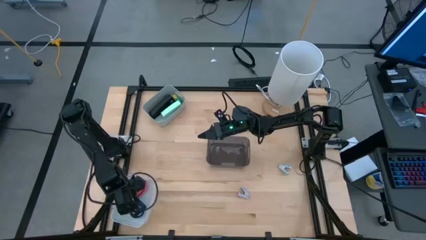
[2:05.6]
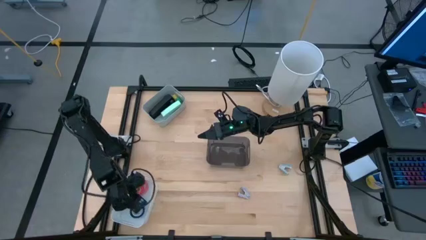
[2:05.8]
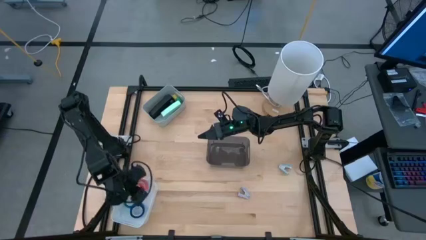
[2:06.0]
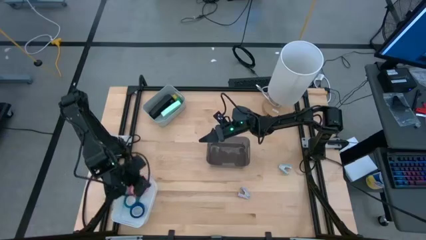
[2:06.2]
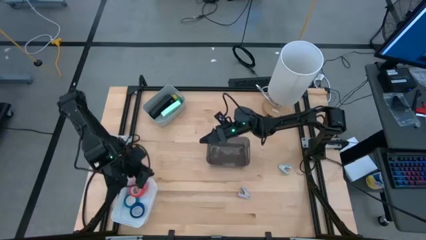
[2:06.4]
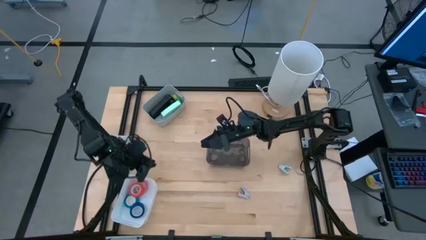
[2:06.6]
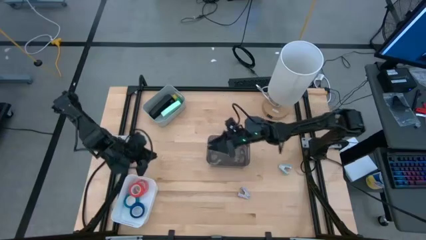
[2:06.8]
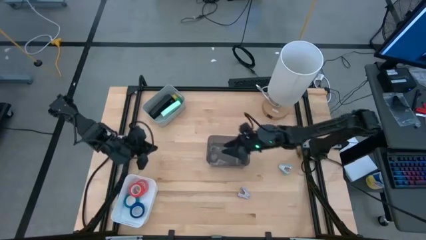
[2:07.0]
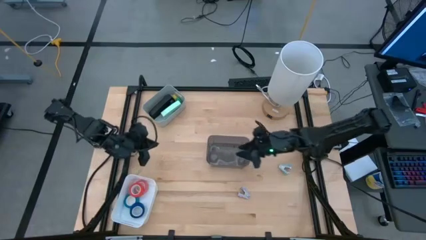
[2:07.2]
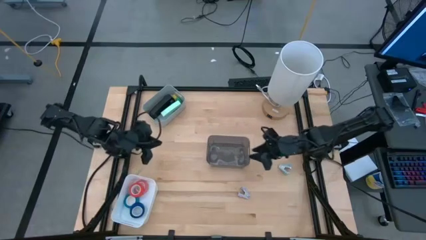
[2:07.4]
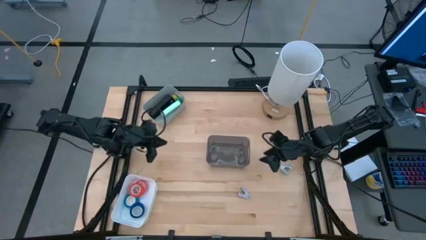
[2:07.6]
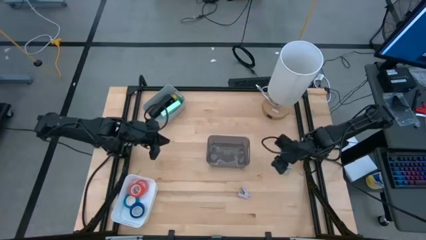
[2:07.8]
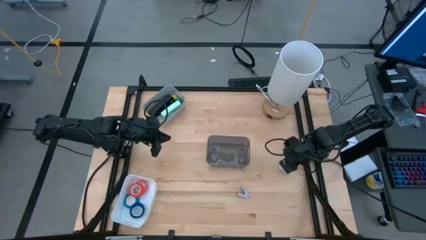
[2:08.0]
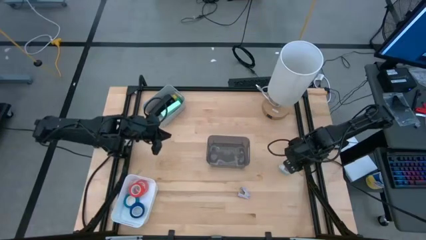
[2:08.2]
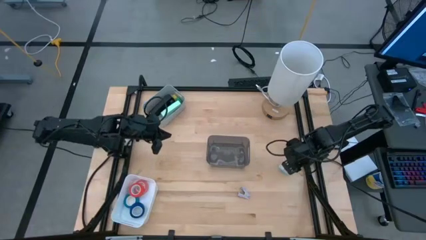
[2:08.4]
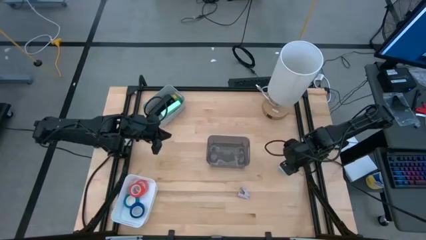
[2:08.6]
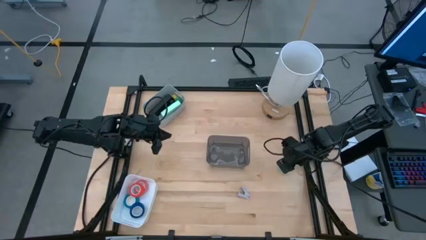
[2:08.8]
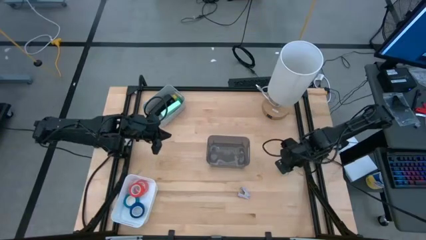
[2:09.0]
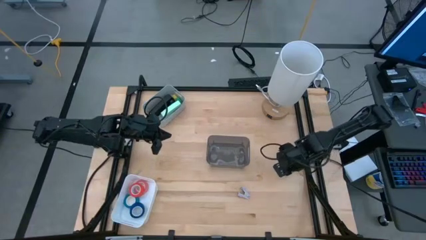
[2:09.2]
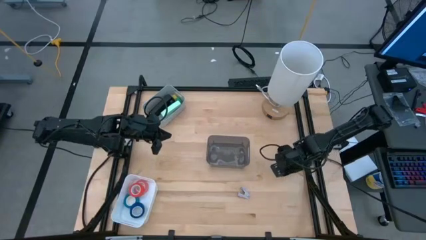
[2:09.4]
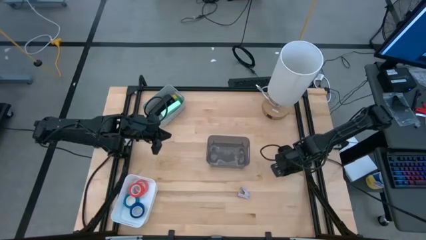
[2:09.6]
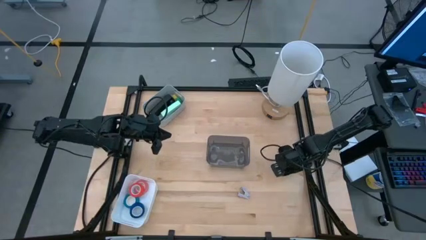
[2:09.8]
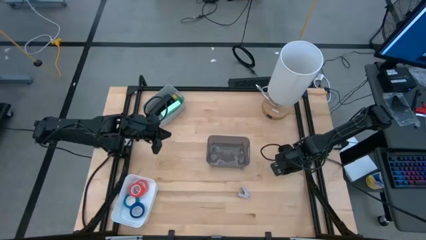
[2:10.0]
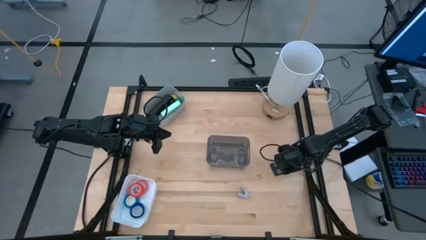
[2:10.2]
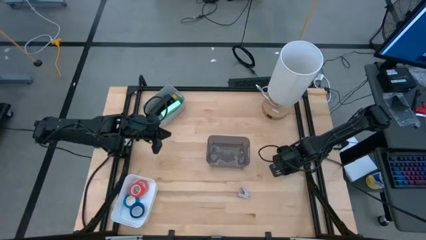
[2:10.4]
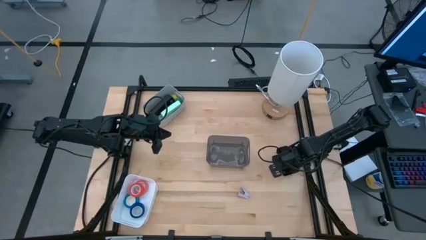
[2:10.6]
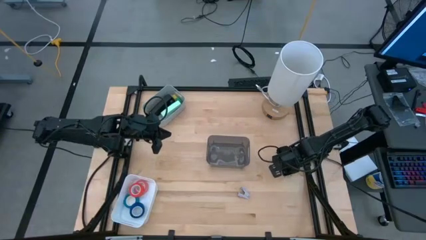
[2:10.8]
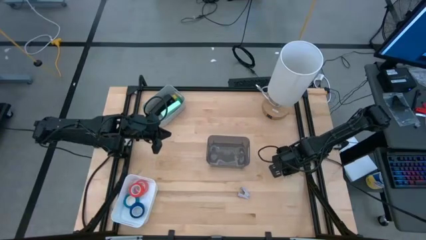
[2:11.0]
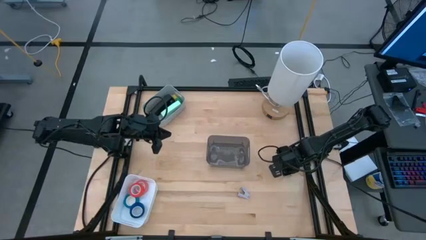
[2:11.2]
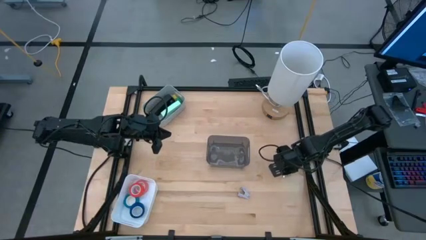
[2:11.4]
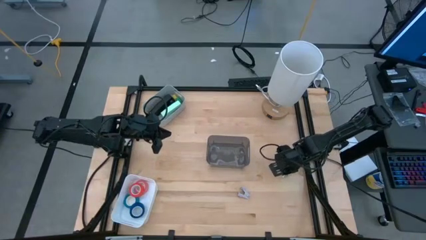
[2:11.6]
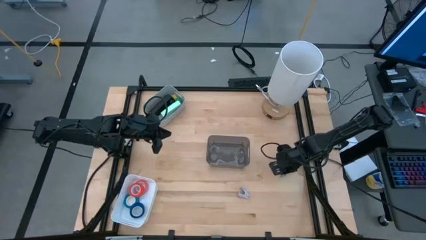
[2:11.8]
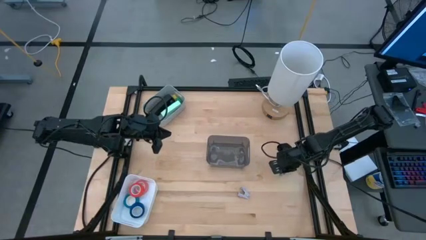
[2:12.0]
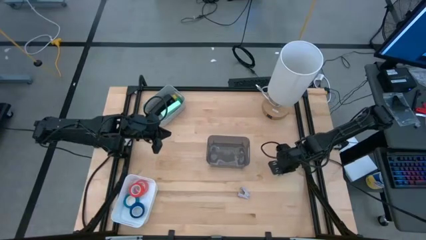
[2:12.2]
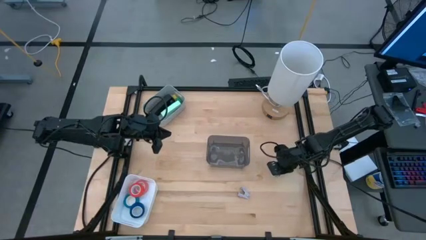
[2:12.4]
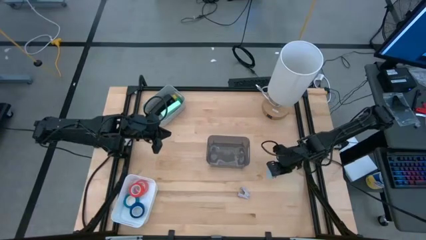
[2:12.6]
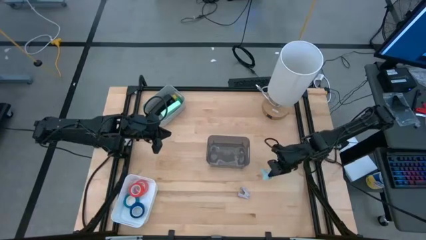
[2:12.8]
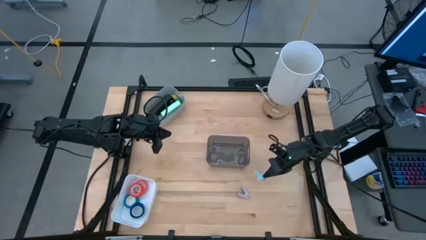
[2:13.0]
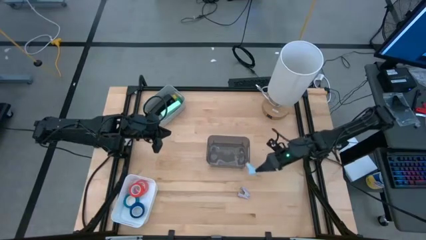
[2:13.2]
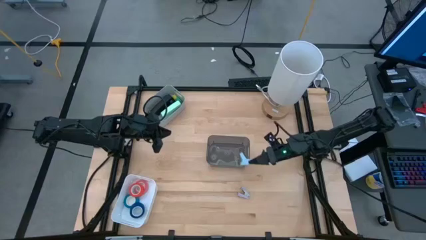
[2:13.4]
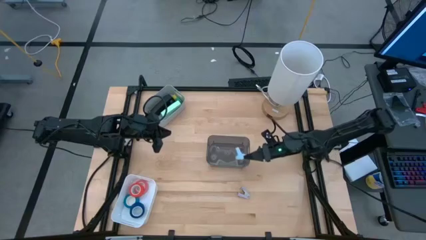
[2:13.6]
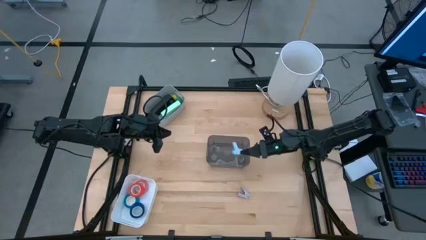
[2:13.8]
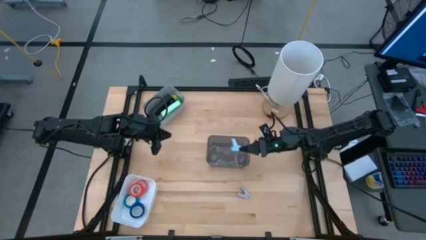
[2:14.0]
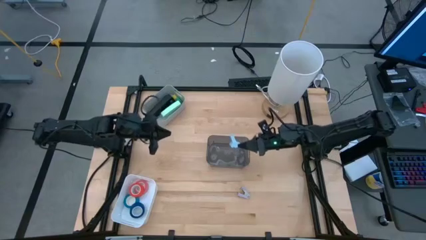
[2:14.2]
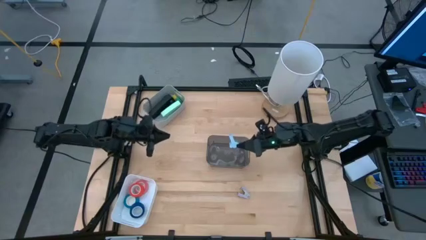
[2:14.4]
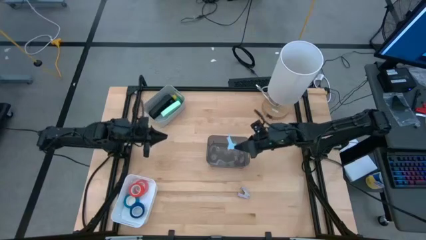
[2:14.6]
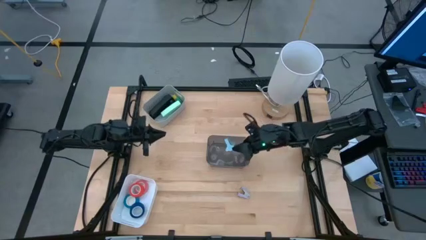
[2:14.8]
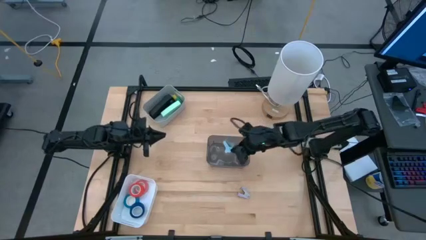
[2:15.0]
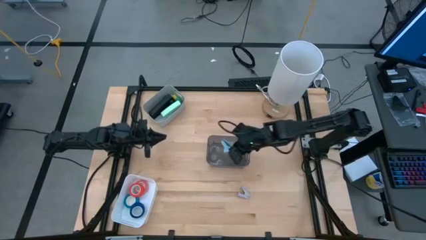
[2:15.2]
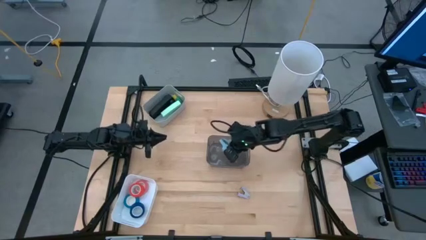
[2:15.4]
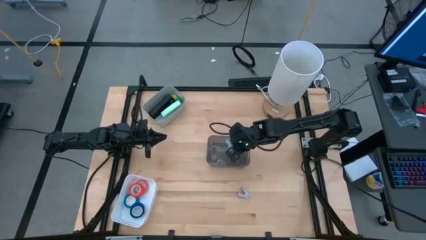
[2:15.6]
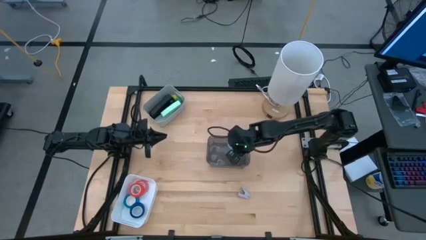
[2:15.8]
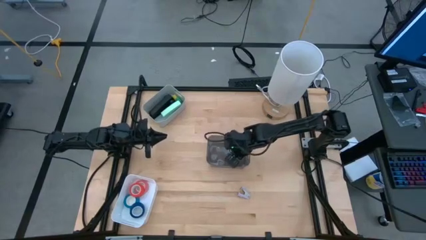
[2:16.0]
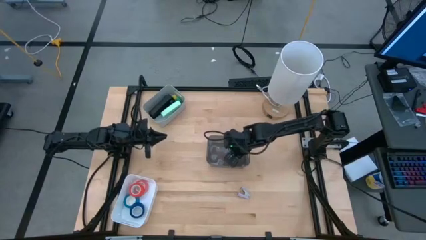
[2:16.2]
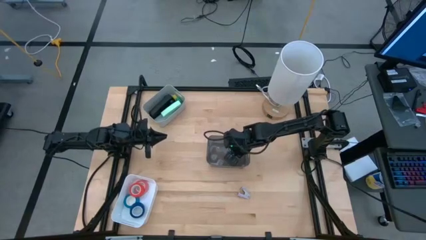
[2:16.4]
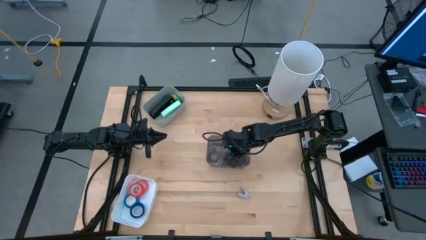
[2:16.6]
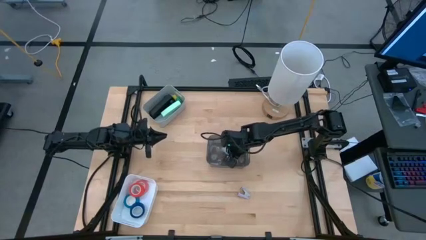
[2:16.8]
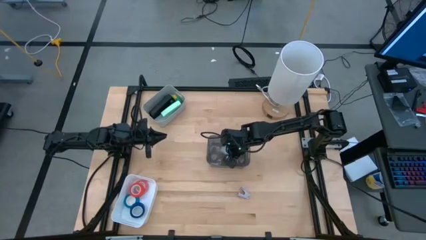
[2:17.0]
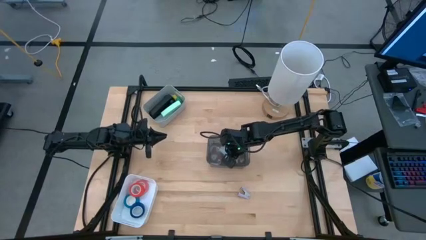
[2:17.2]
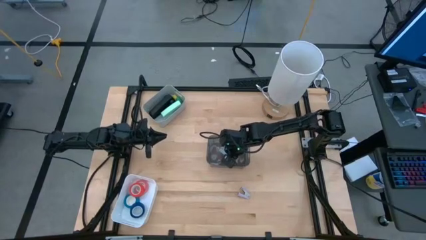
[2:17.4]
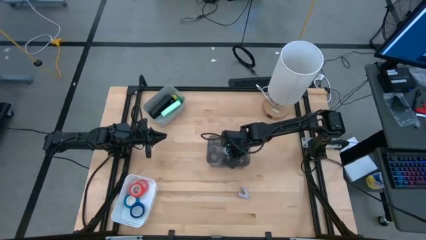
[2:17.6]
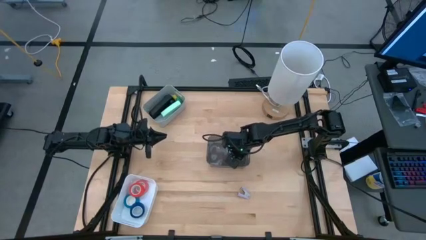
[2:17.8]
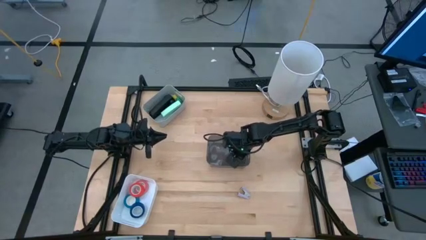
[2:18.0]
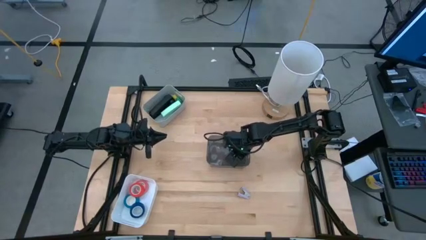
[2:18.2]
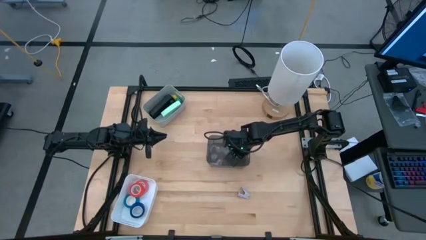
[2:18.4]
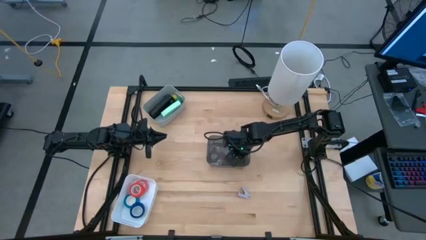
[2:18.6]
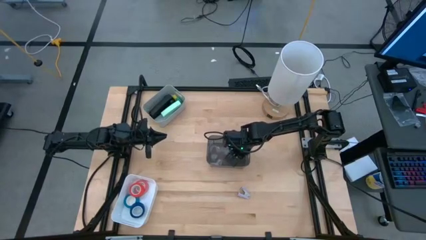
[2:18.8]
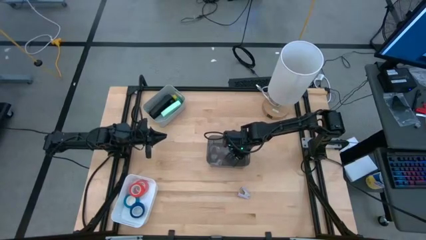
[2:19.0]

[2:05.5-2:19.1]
Task: Pick and place Stapler, Stapler remover, tape
Put the blue staple remover into the black bin

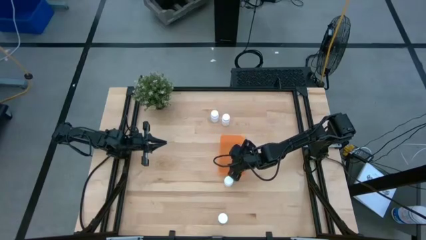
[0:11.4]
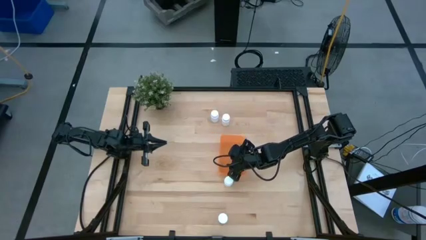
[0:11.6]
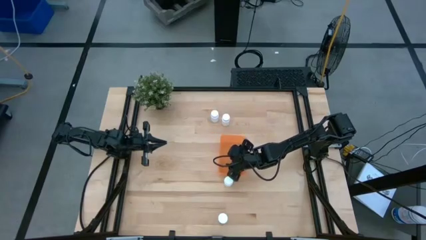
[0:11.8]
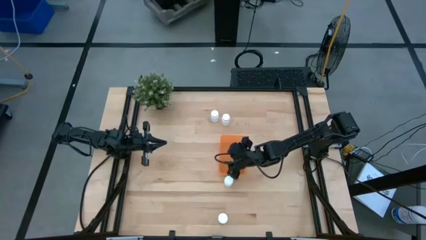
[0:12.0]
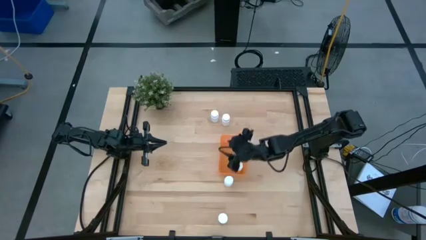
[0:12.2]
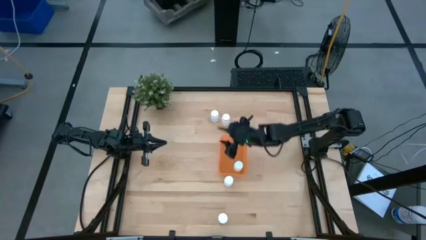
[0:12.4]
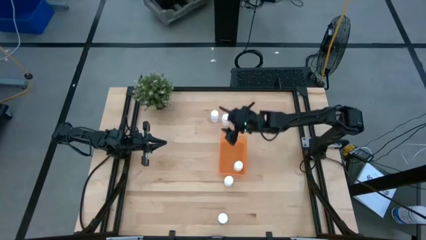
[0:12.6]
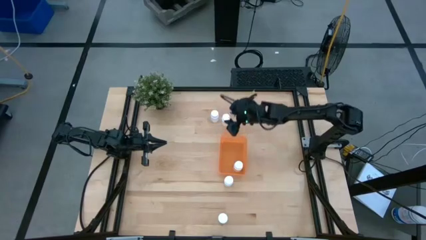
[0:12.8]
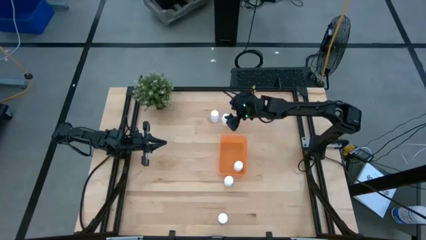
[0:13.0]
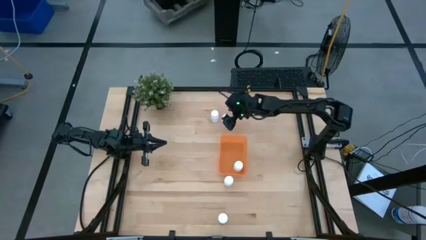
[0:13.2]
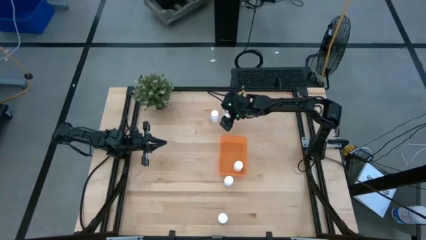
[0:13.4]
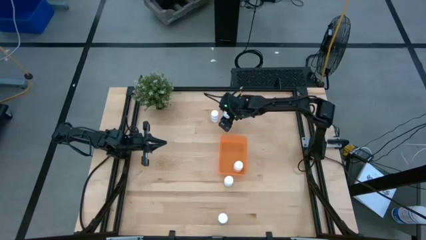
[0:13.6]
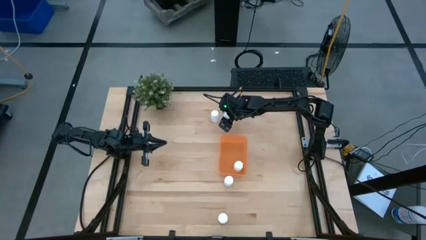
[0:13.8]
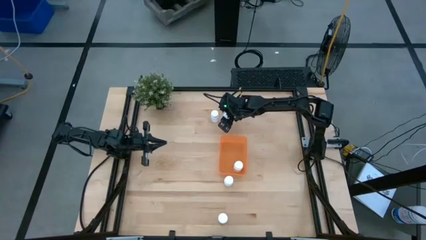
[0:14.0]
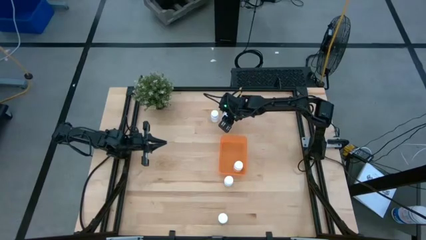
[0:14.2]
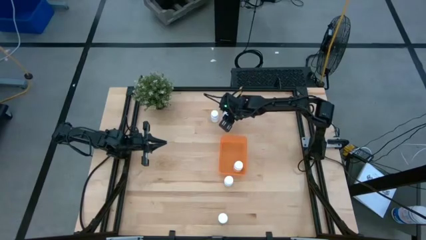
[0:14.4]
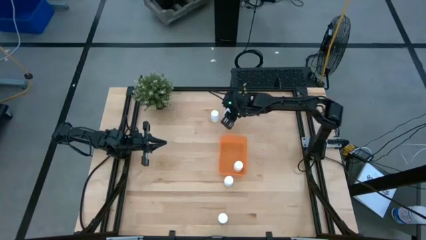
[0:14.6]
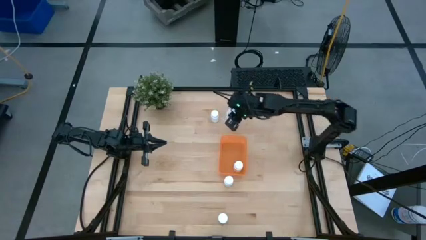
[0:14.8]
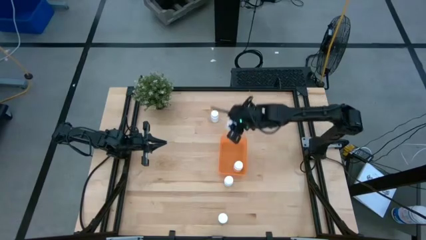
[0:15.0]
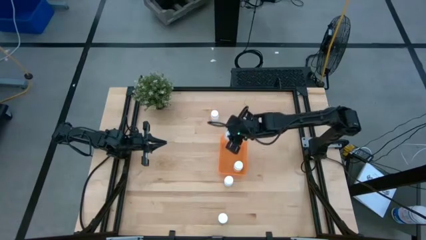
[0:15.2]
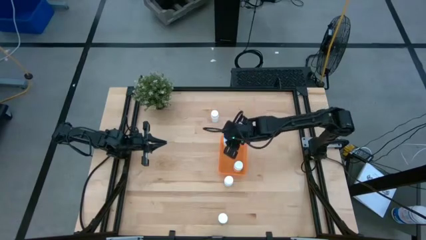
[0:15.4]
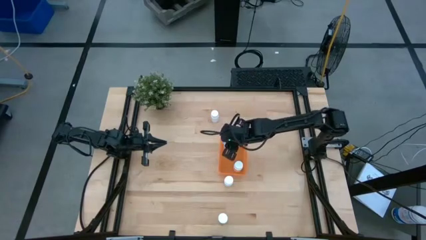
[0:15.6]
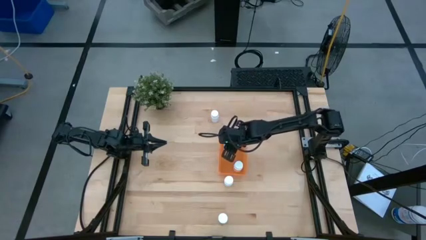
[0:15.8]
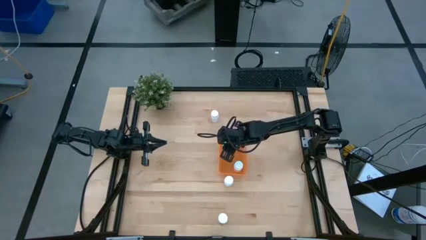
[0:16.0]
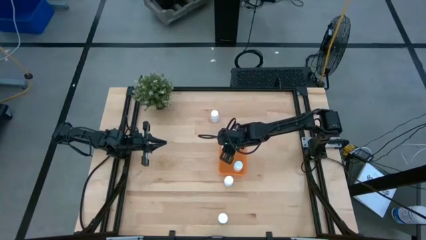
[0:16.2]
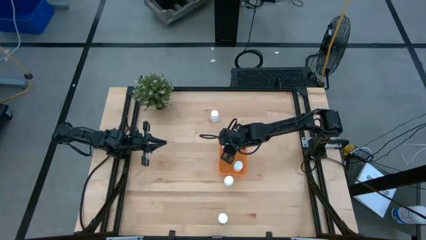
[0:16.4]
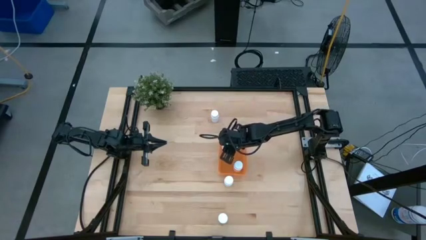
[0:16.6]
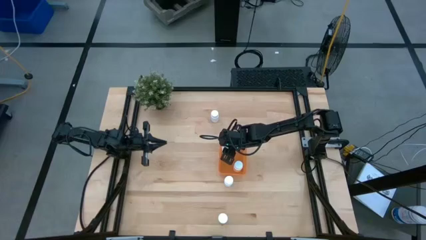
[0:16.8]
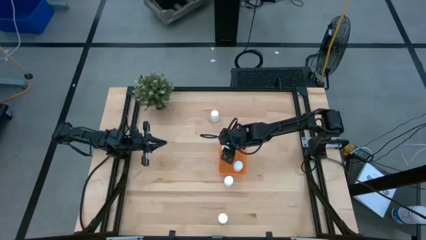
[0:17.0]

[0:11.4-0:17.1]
Task: Pick and place pill bottles into a basket
Put the white medicine bottle into the orange bin
